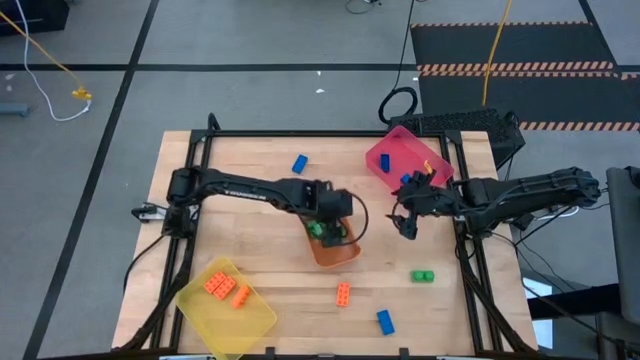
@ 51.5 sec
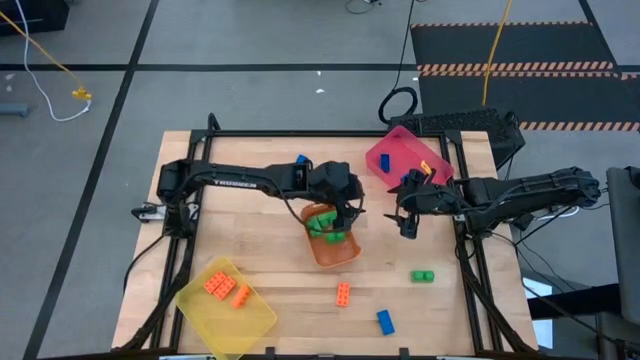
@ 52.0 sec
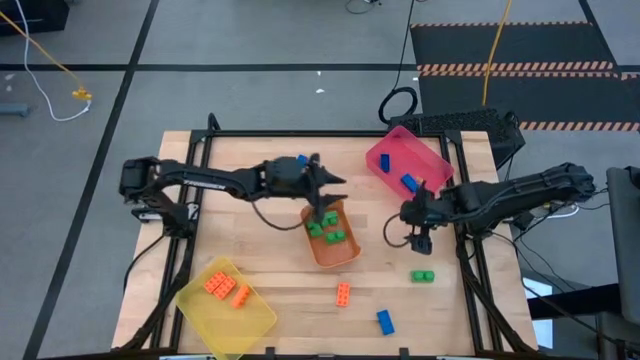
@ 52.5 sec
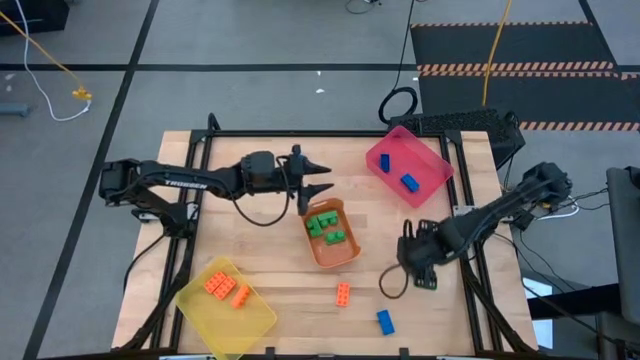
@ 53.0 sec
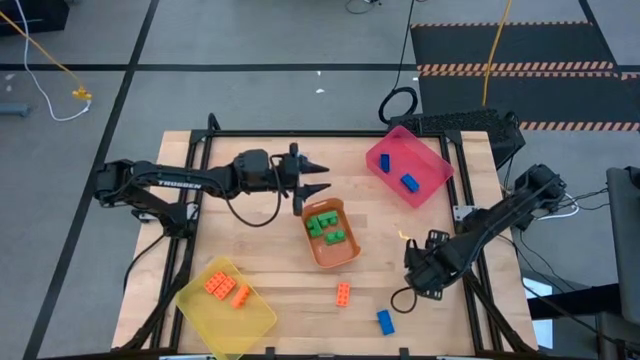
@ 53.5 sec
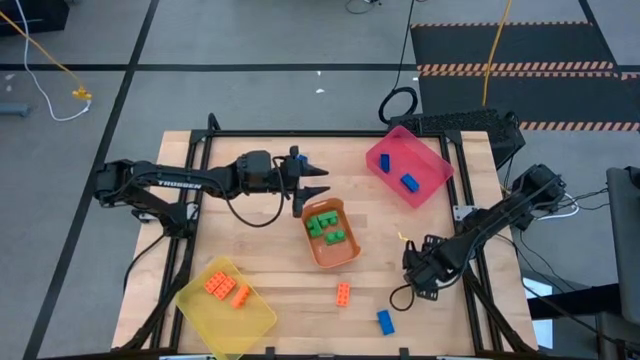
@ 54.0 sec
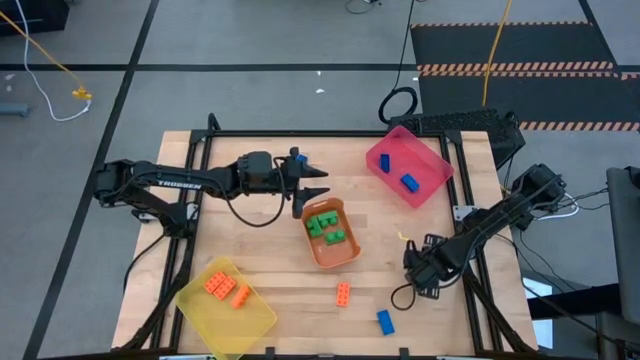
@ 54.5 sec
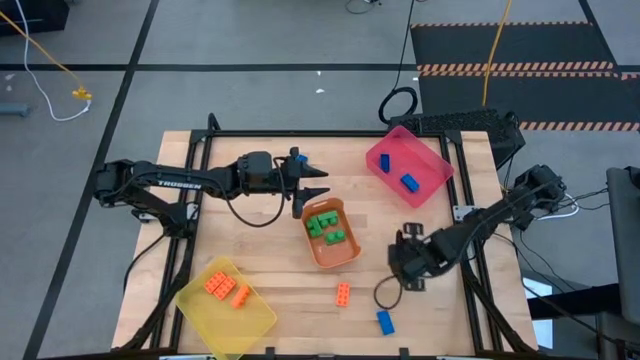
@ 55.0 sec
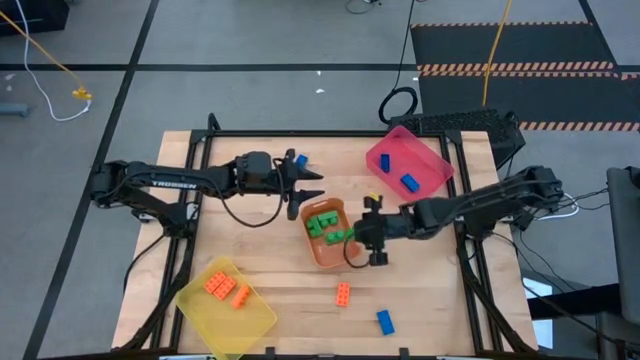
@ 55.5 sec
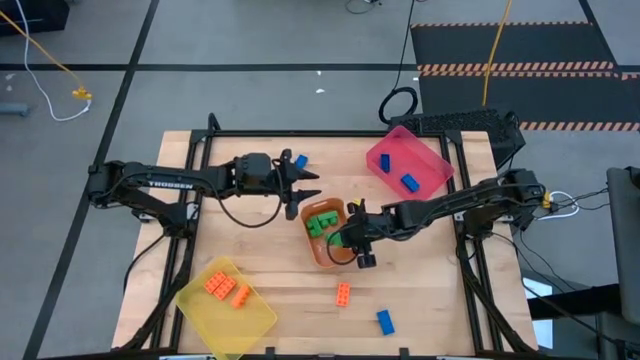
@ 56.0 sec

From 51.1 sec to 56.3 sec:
Task: Sort & place blocks by color
Put the green game piece into the orange bin

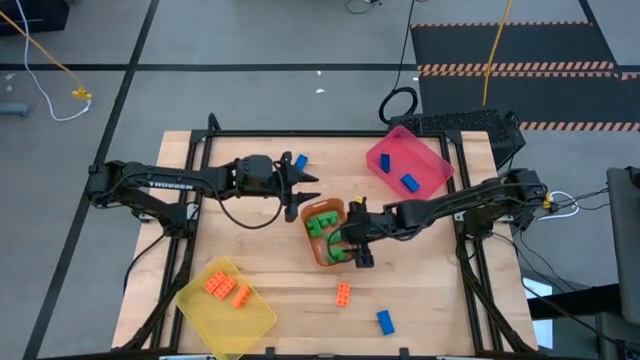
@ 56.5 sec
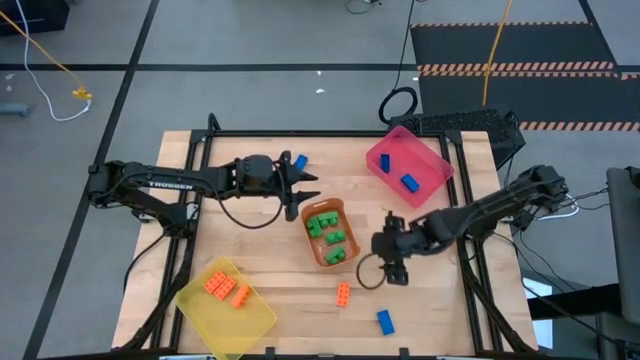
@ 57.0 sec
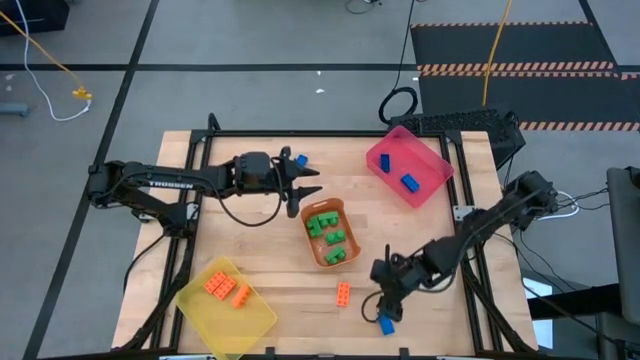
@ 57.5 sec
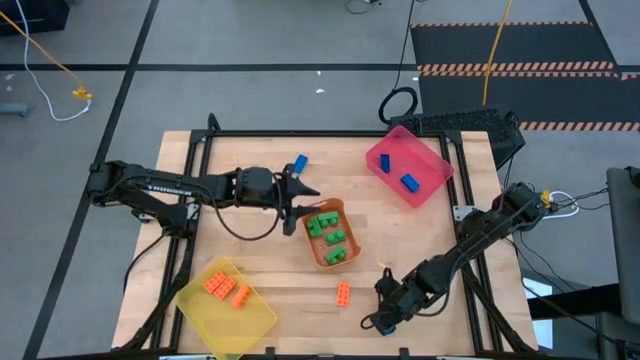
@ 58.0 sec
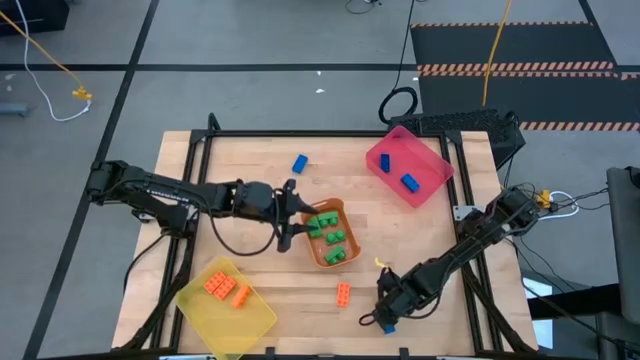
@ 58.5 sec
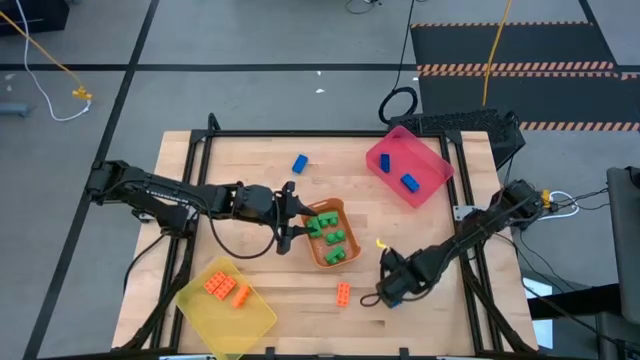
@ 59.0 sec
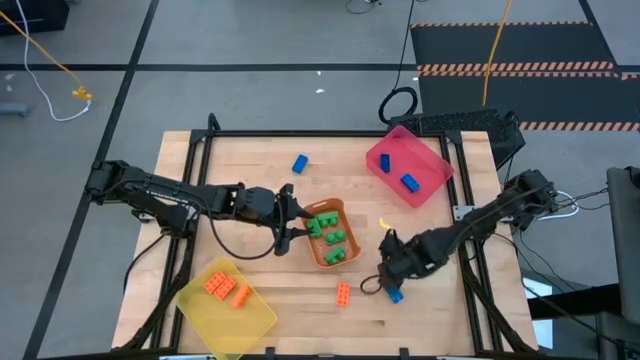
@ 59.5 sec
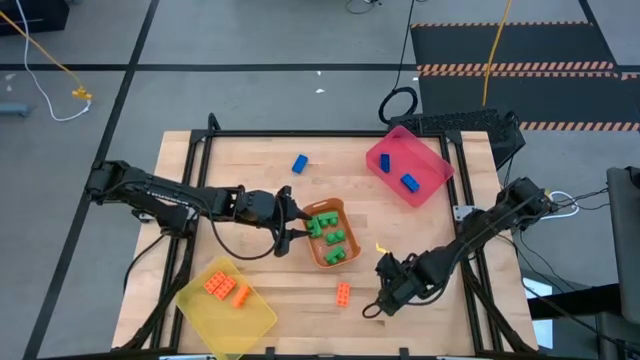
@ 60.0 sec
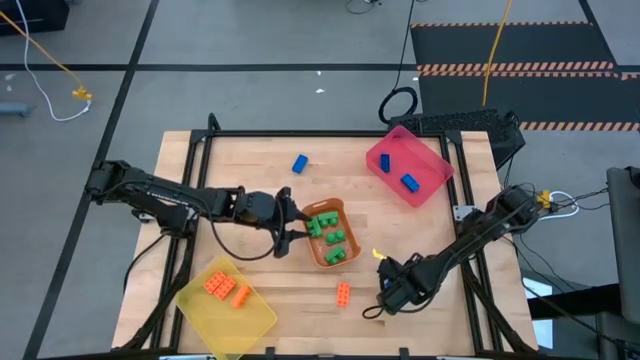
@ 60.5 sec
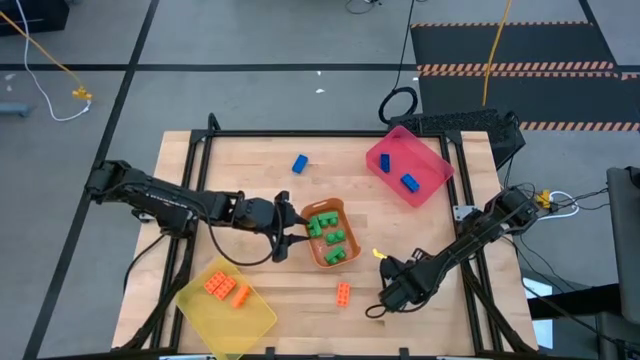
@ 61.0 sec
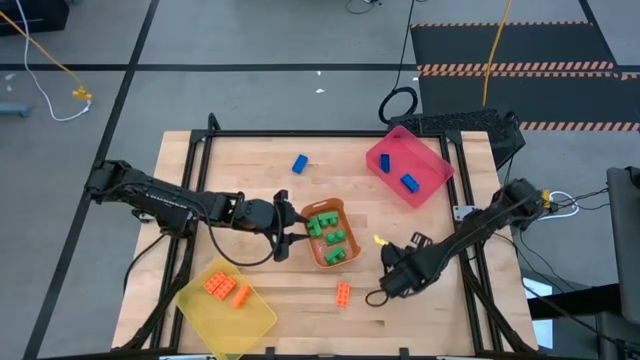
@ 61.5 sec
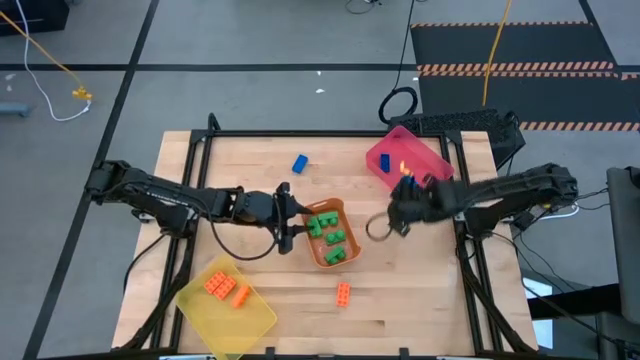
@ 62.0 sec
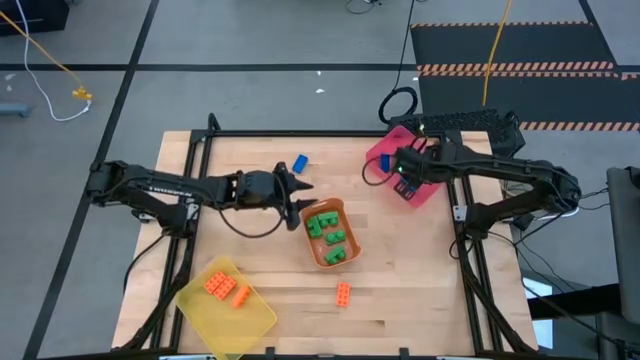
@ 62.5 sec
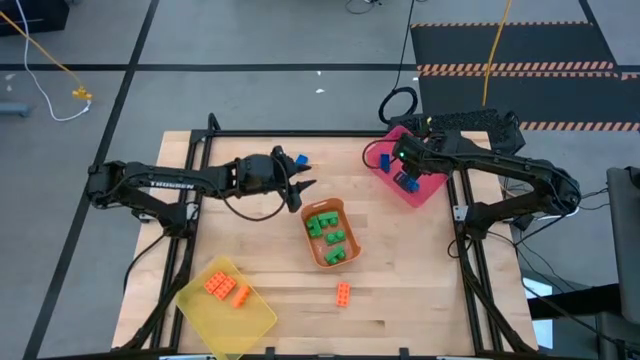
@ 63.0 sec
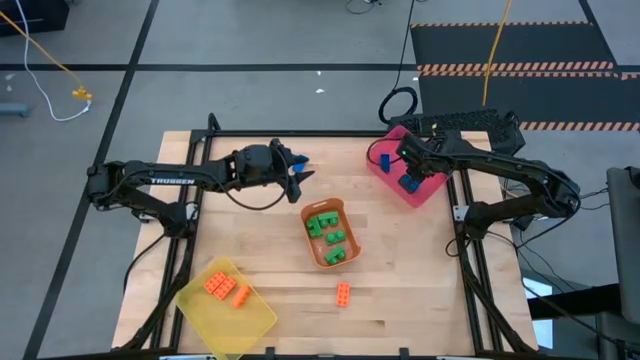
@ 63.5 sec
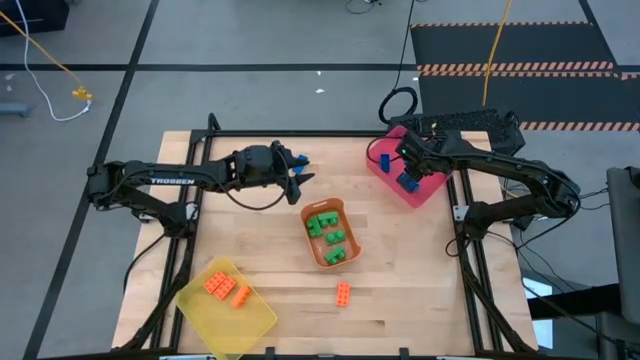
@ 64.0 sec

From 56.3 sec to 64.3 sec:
Put the blue game piece into the pink bin

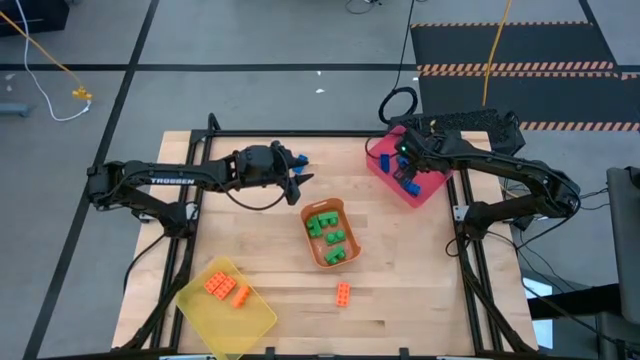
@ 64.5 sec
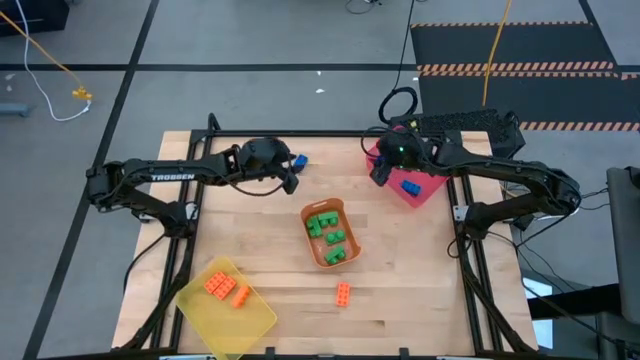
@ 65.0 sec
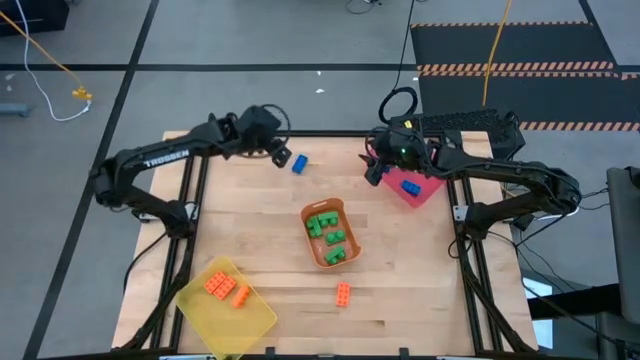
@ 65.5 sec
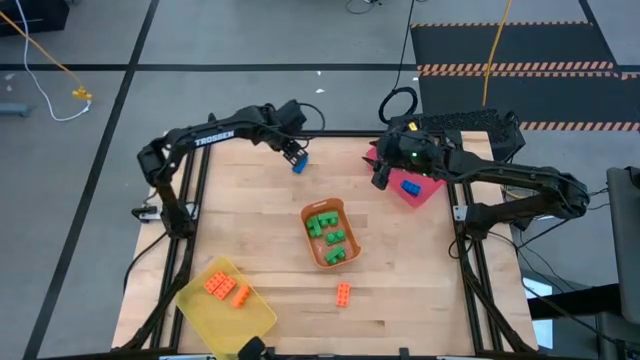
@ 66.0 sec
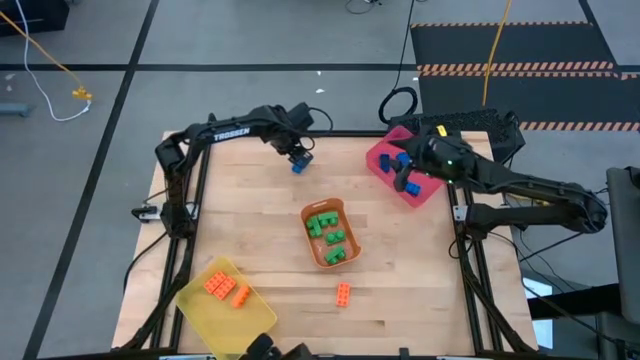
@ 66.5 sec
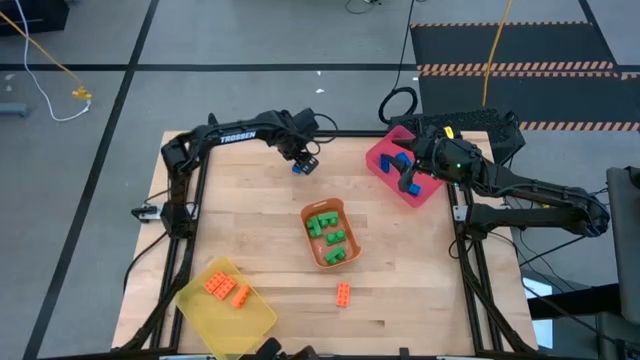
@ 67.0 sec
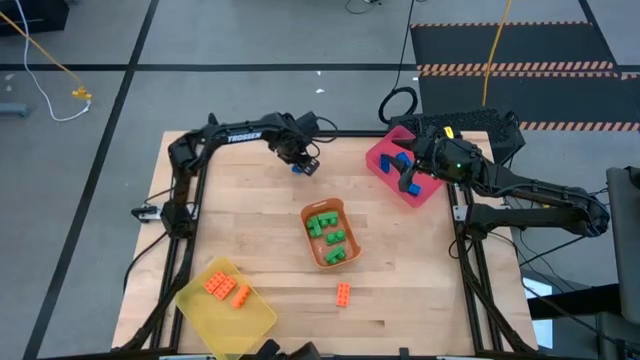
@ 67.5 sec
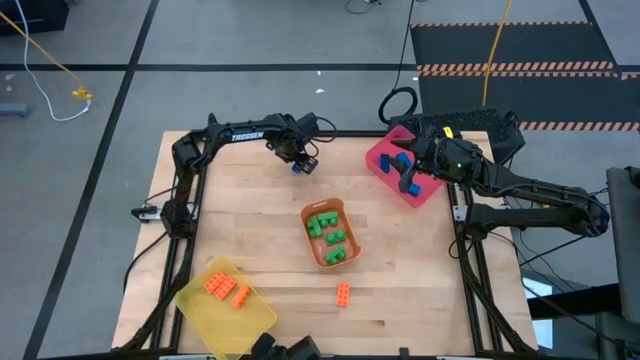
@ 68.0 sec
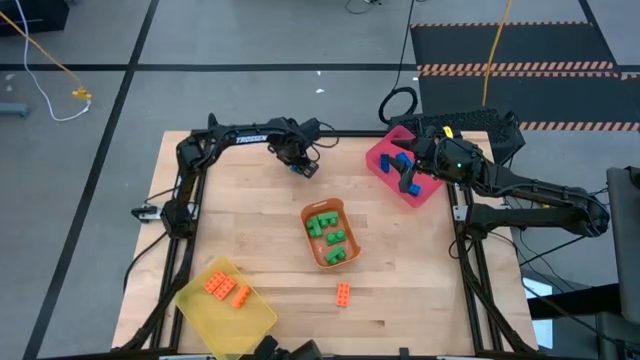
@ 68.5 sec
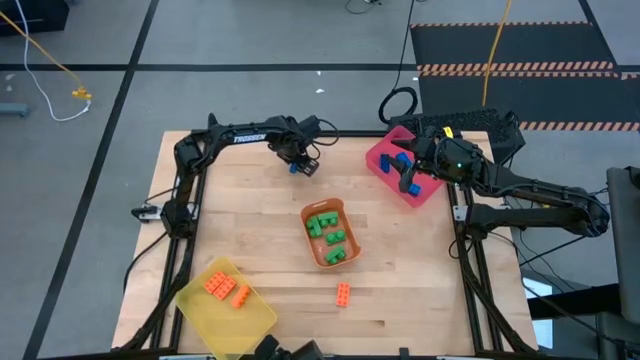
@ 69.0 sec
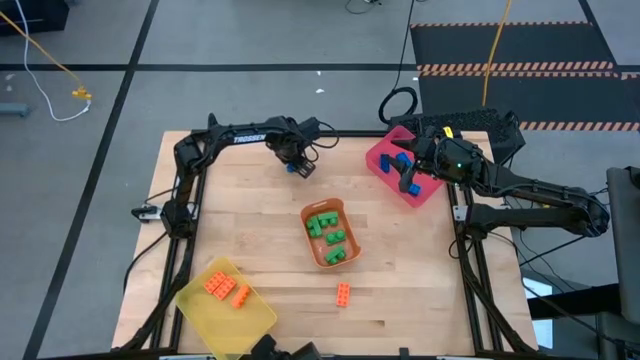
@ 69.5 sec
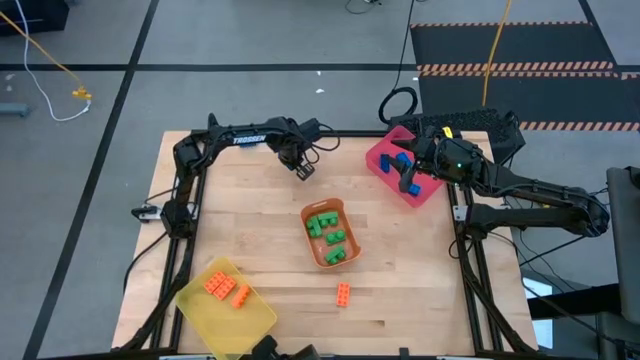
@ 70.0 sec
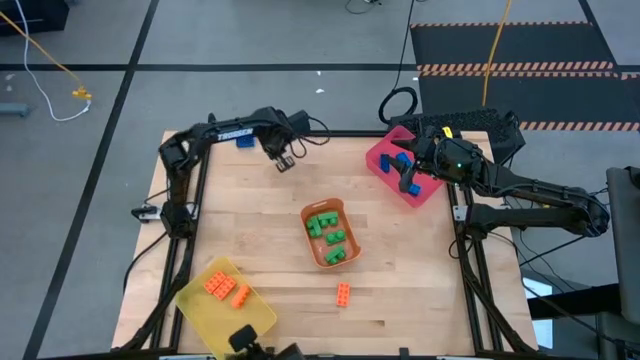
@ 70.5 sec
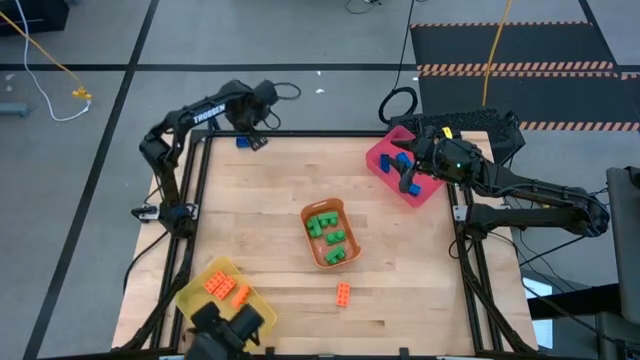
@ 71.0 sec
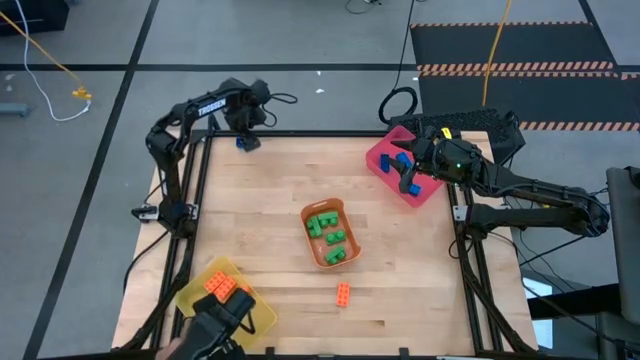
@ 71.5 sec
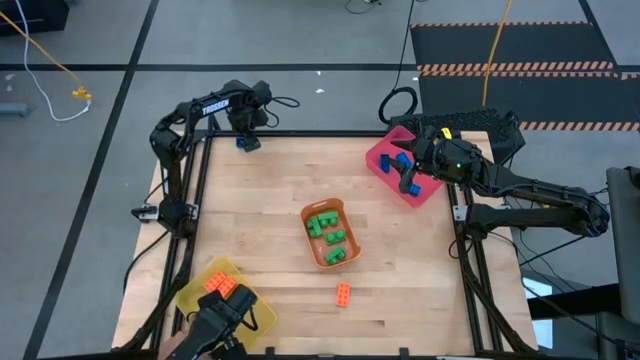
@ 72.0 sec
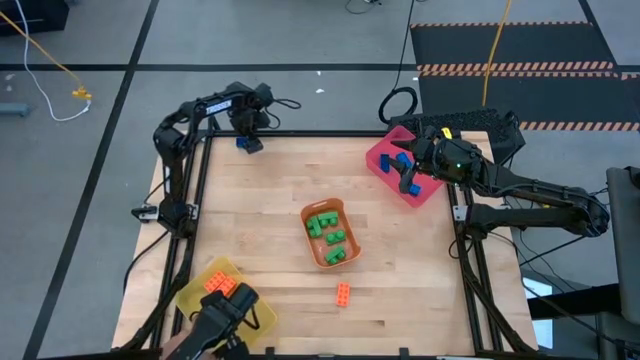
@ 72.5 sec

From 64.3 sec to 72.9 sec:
Put the blue game piece into the pink bin
